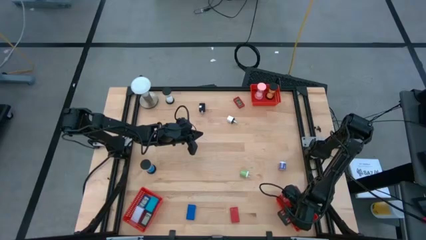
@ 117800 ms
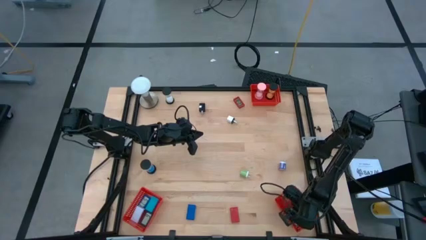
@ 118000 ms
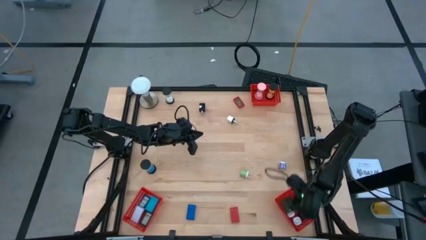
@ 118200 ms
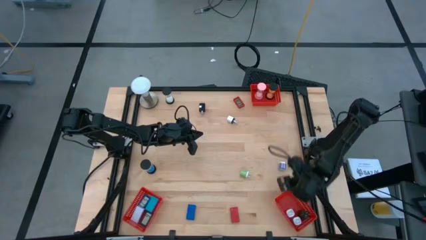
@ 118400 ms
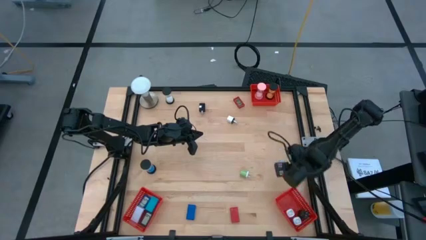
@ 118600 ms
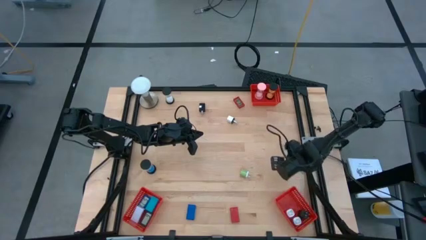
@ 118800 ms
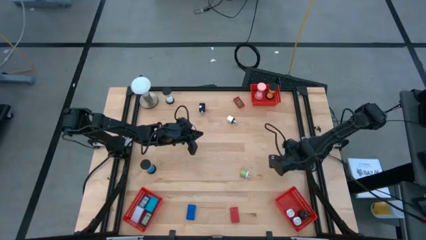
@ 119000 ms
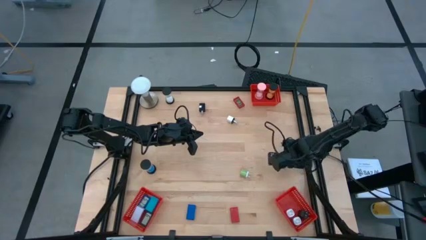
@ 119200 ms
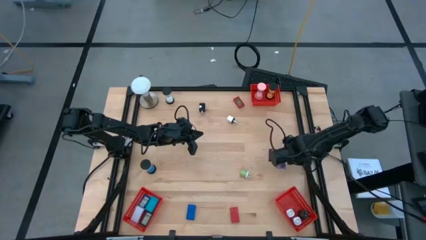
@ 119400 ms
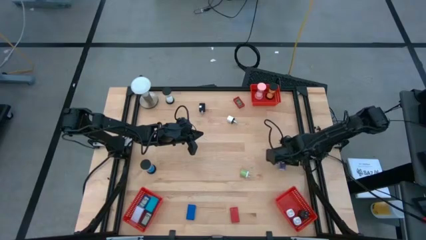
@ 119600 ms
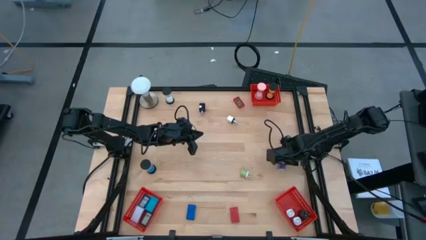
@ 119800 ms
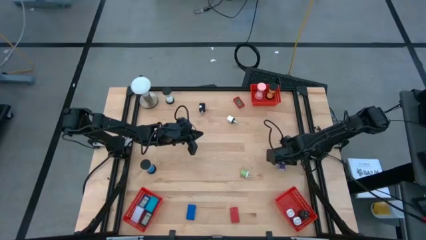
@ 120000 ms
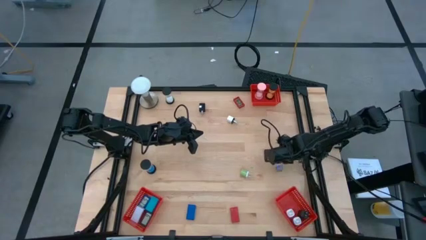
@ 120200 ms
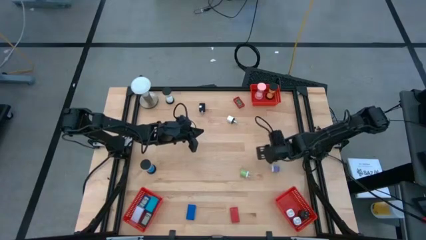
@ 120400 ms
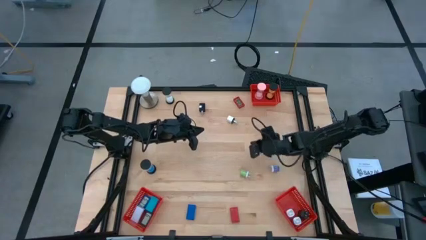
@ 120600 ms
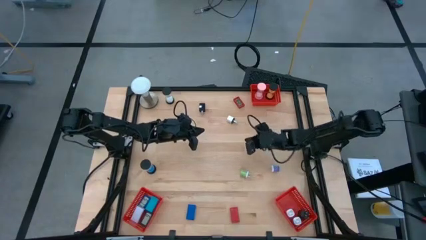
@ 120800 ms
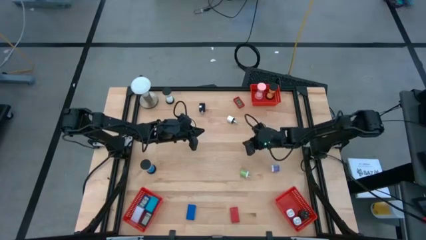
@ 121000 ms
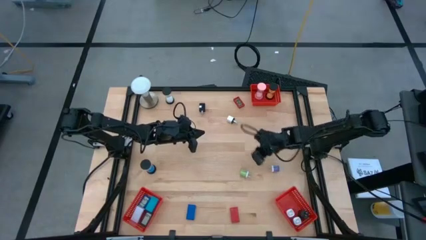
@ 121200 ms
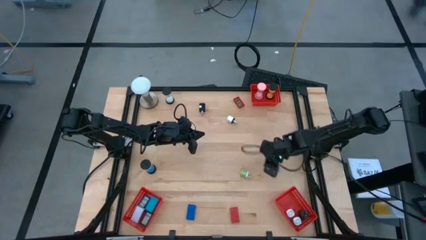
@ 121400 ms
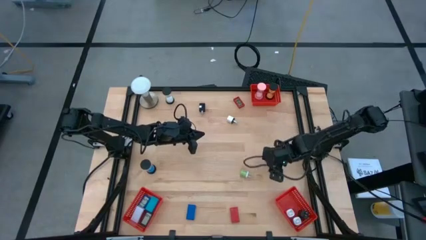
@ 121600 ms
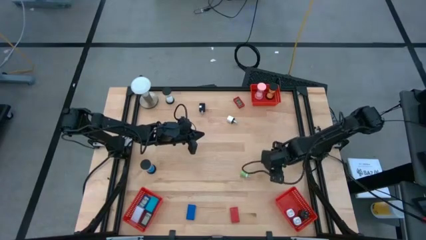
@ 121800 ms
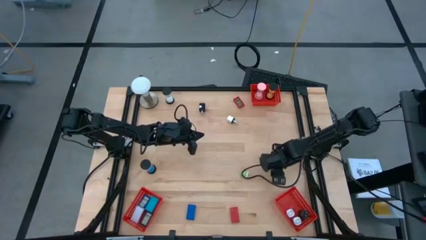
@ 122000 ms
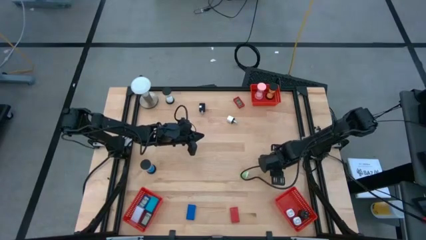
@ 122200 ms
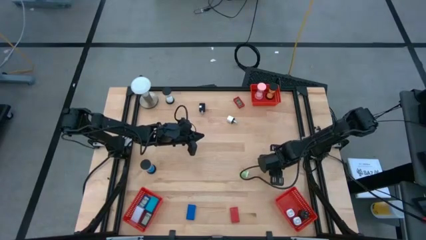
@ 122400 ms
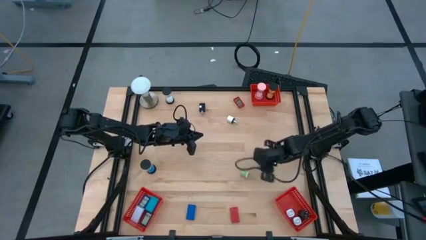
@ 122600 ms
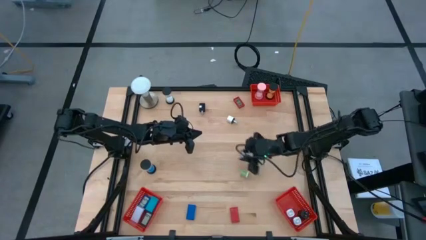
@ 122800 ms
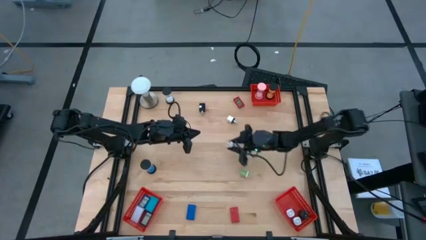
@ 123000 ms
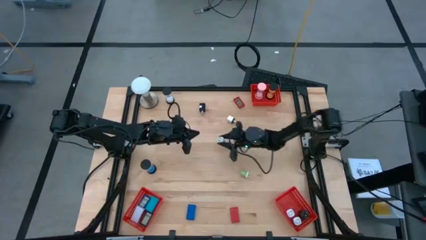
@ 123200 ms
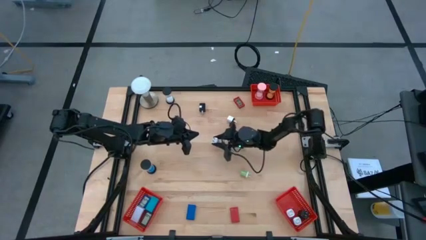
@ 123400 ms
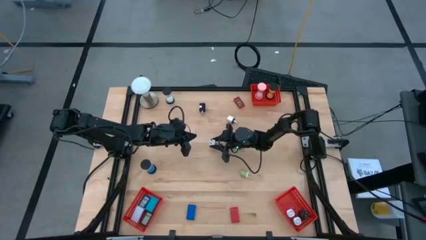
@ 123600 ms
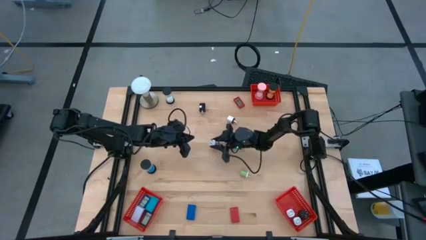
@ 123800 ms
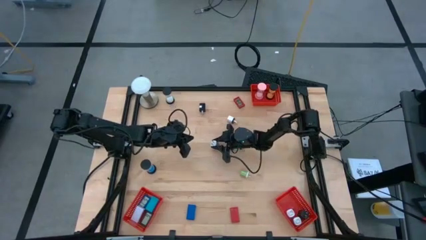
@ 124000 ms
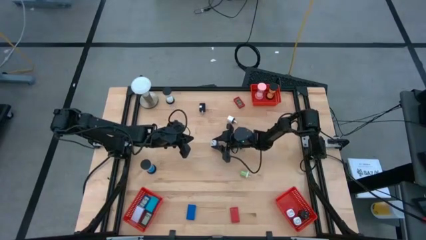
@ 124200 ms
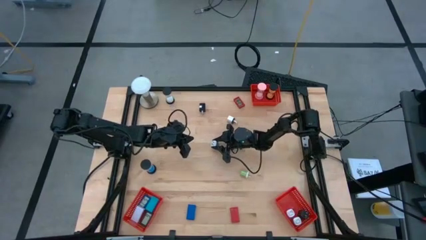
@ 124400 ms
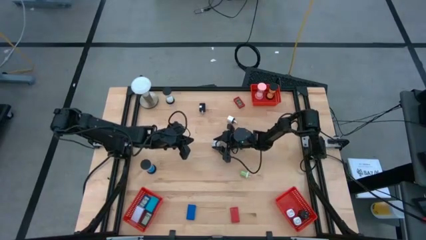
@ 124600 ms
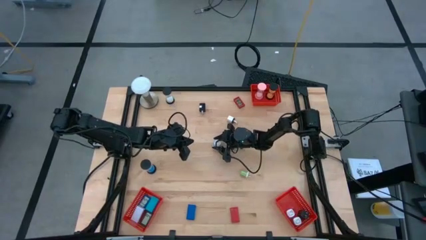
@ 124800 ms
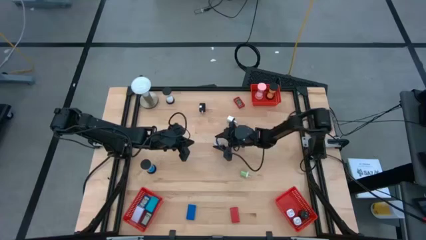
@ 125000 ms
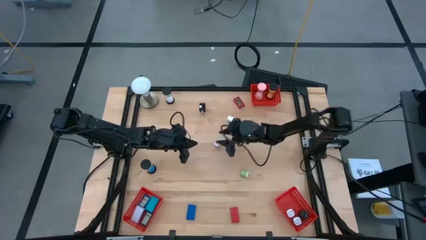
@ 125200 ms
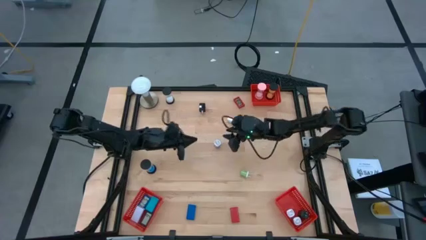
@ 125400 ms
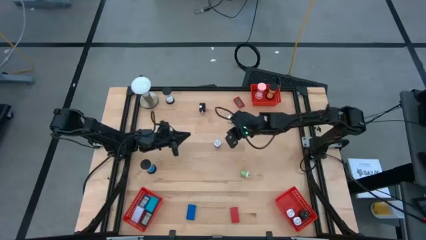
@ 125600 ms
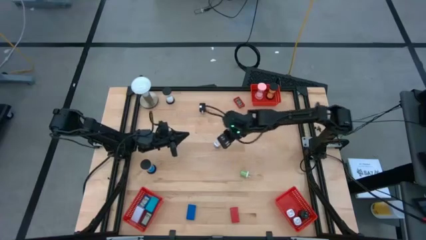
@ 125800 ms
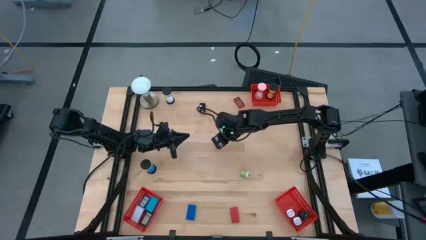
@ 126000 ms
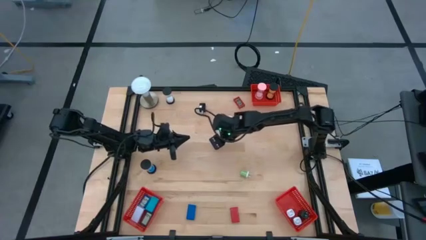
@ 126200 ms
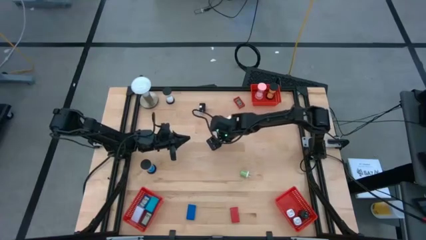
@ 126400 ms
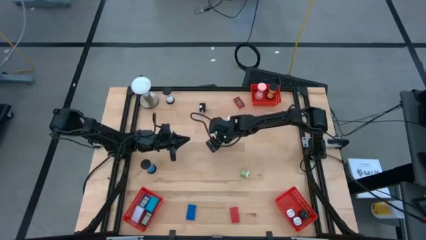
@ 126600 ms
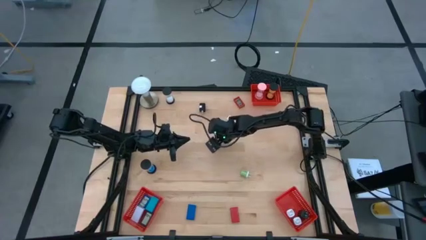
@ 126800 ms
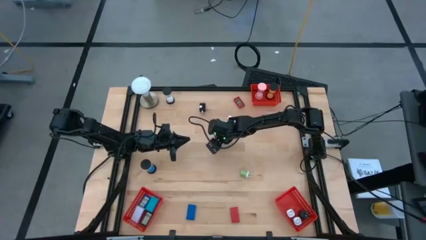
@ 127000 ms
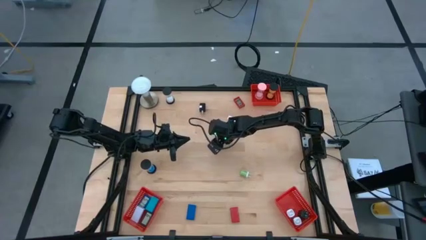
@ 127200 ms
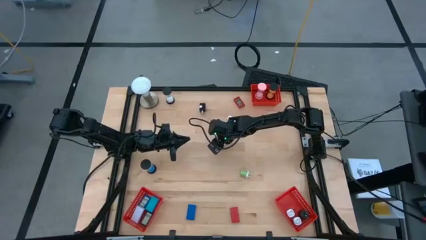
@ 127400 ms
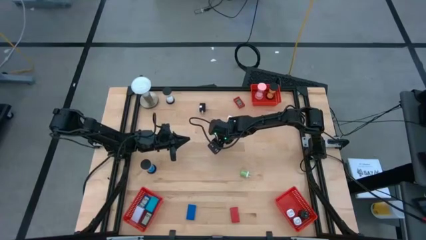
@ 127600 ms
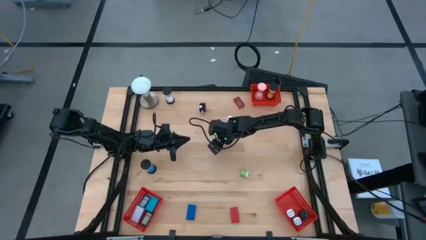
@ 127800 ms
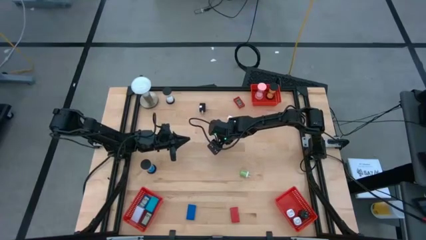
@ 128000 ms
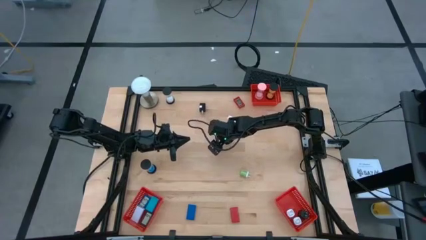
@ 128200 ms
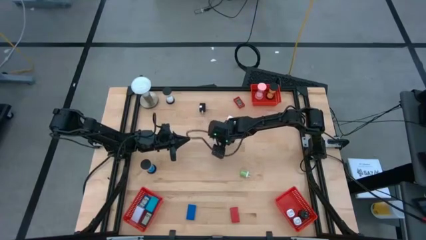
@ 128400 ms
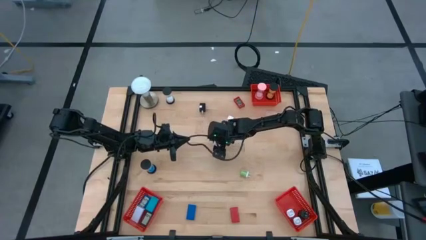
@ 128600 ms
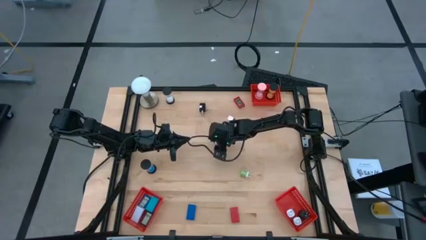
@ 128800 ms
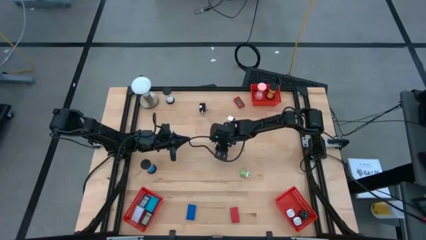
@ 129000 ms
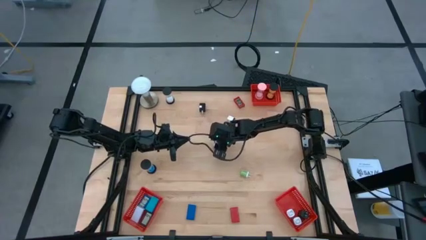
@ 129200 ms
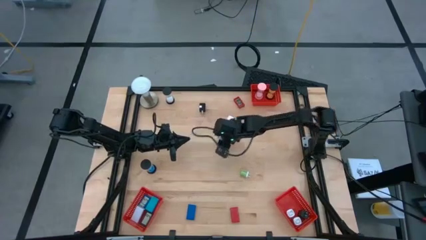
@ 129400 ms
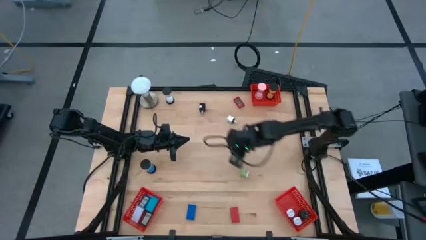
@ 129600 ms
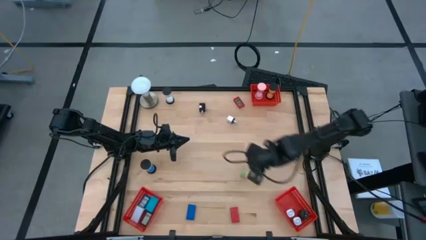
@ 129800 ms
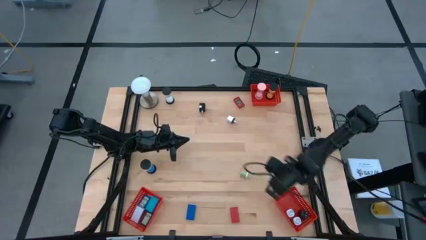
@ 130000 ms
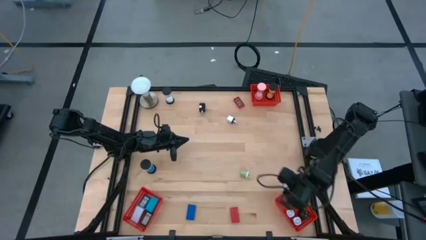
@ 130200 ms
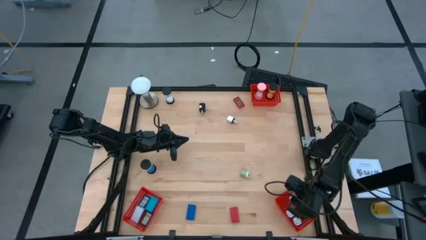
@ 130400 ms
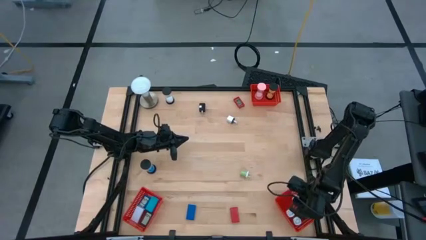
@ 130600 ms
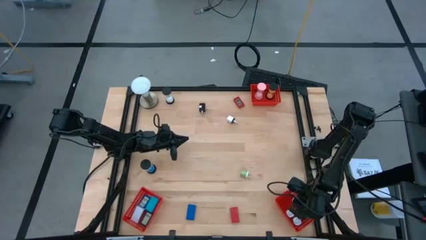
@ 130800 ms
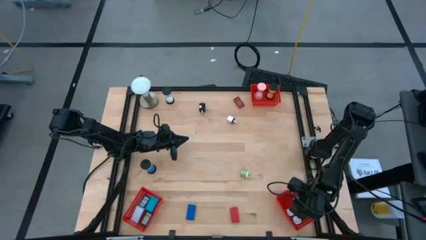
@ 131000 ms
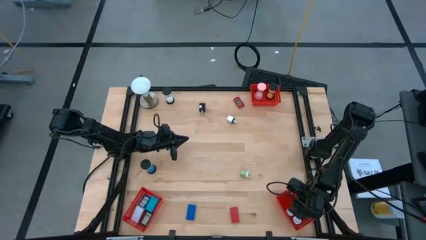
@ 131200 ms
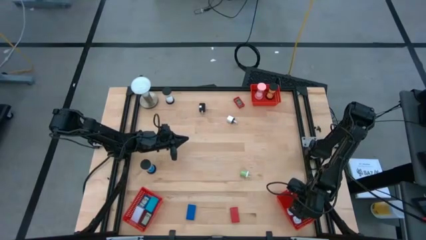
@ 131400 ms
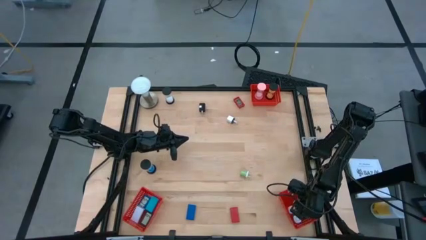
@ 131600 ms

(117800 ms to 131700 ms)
Task: Pick & Place Office items
Put the blue charger adapter into the bottom right red basket

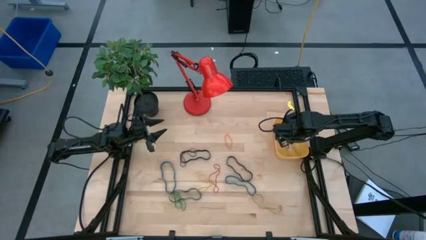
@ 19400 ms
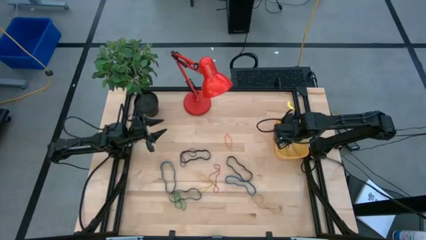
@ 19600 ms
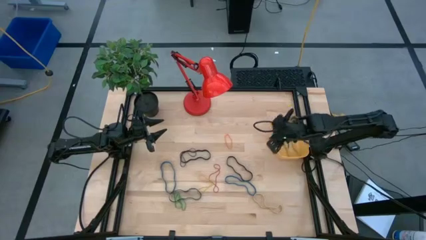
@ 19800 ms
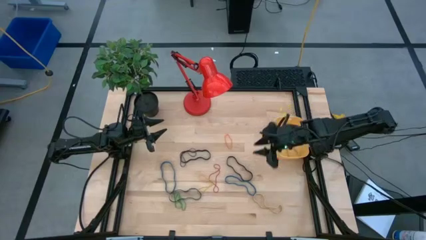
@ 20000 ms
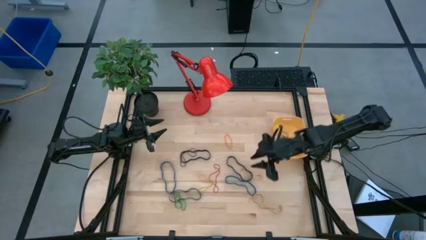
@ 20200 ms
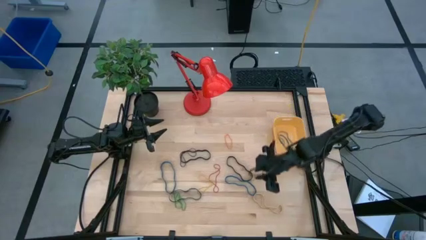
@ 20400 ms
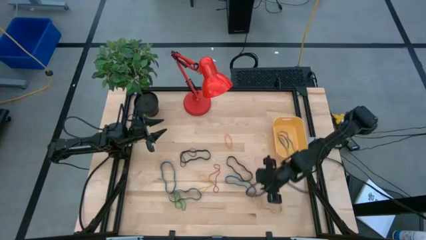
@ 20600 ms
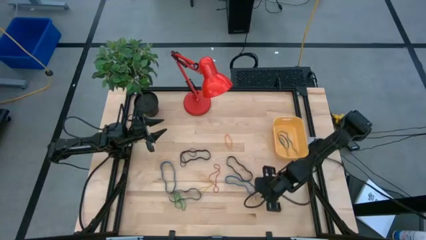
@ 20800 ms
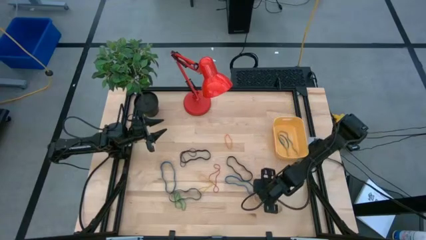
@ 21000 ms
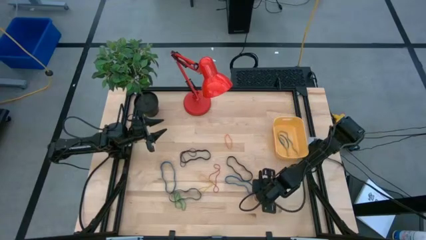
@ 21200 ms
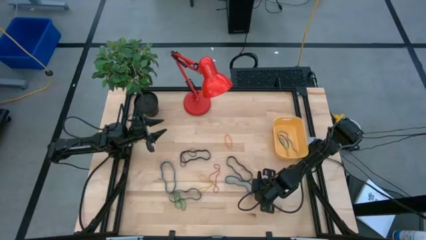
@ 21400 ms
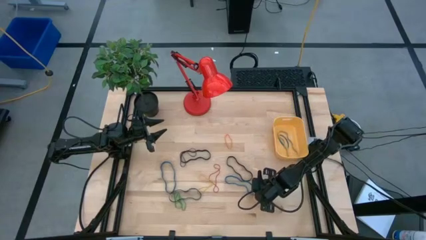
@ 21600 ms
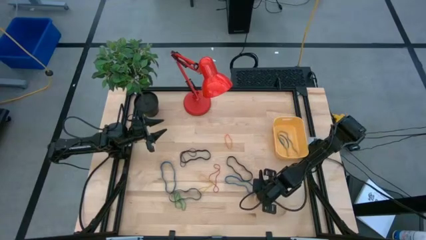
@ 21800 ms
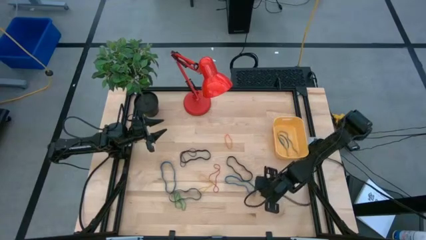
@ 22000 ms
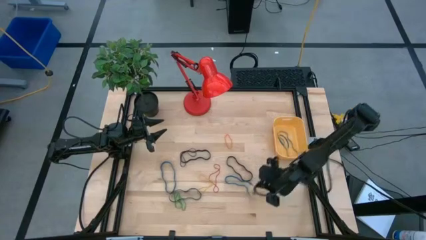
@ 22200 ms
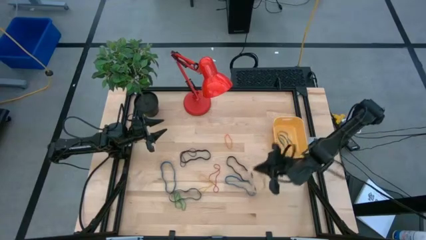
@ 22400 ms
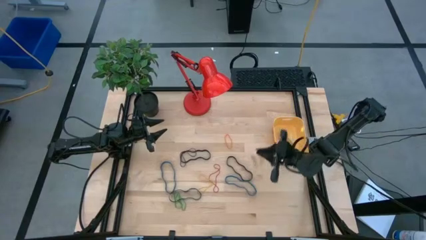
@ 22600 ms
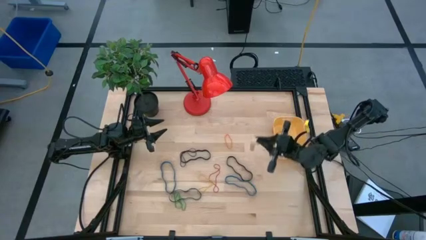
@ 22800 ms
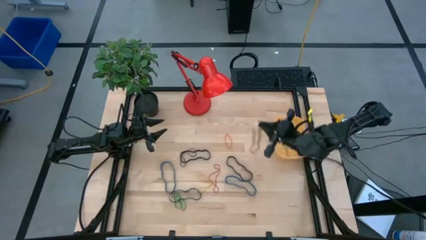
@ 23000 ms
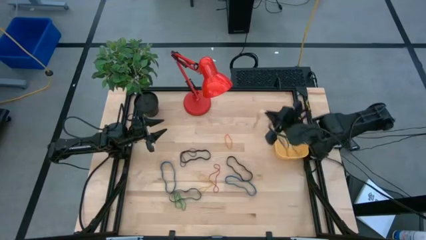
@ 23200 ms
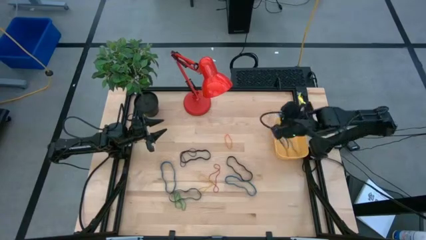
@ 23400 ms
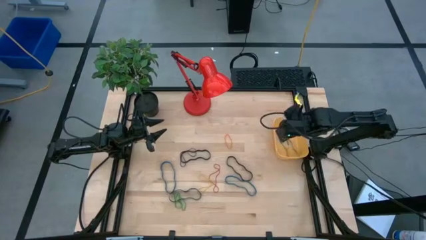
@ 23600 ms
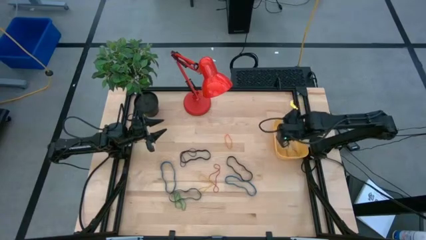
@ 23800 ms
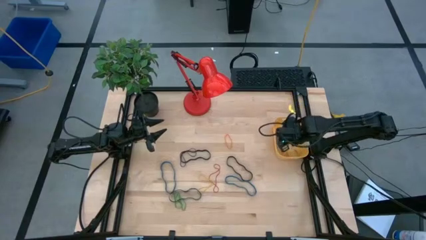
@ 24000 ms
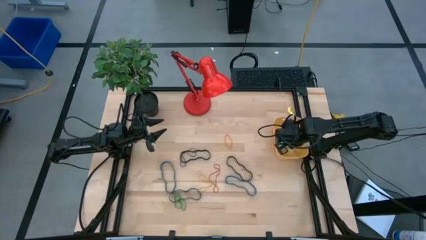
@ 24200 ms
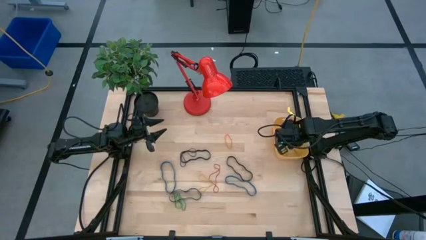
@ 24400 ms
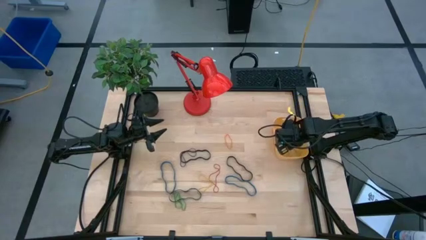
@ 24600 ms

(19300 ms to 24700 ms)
Task: Pick and place rubber bands into bin
Put the white rubber band into the yellow bin
